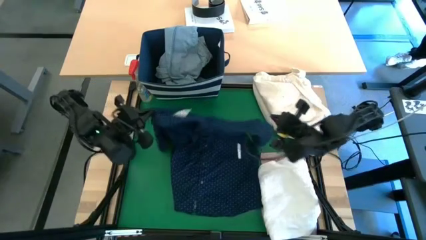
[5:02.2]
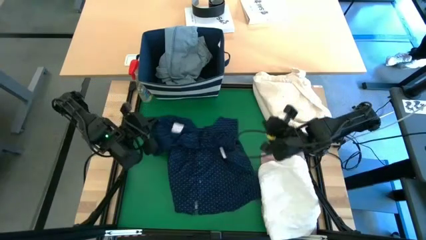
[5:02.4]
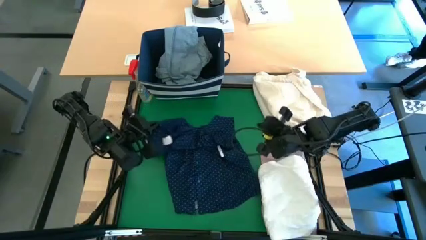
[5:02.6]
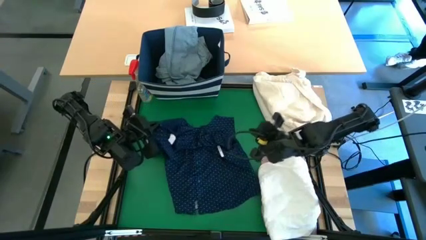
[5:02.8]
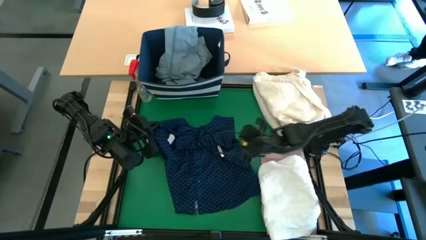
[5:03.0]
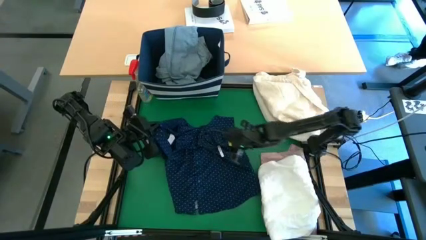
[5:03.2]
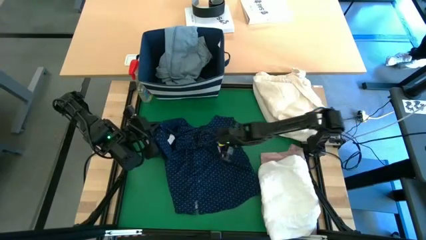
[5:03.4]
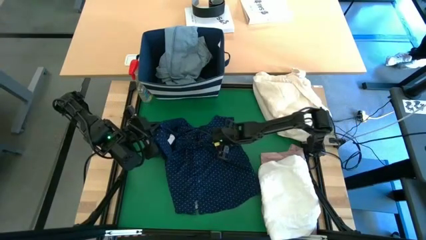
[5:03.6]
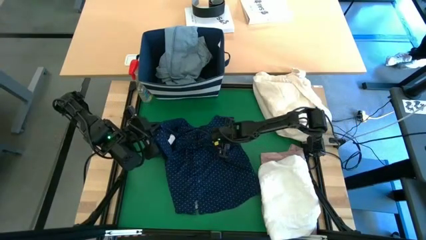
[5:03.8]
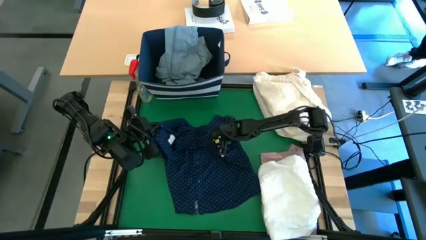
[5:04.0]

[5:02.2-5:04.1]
Task: Fold laundry
Fold the blue polo shirt

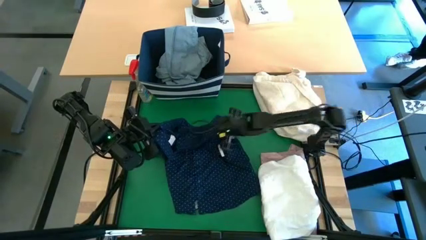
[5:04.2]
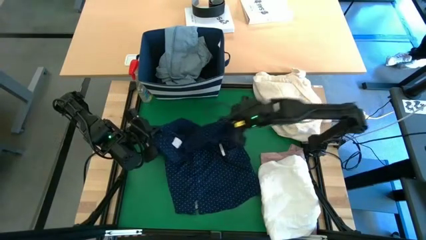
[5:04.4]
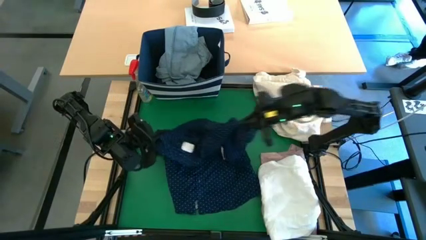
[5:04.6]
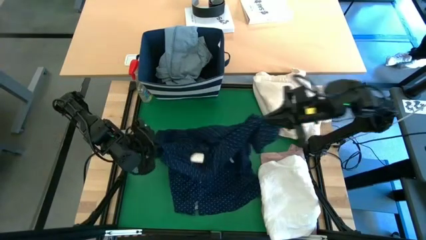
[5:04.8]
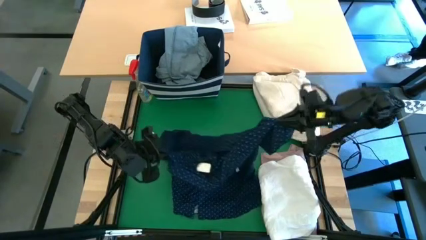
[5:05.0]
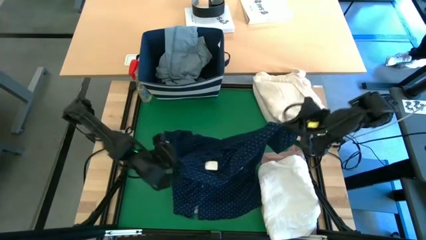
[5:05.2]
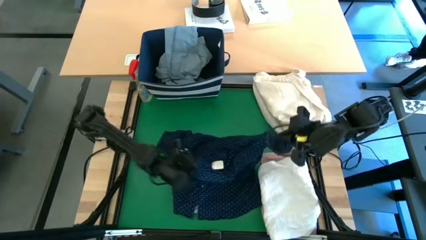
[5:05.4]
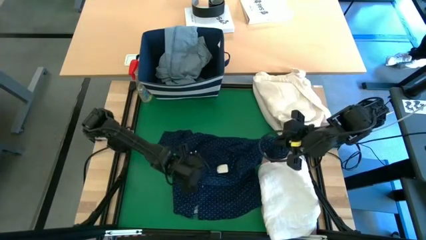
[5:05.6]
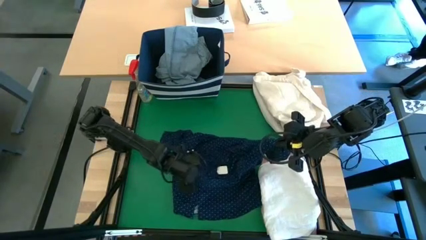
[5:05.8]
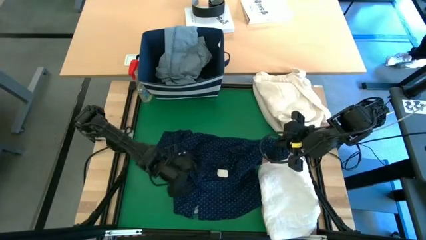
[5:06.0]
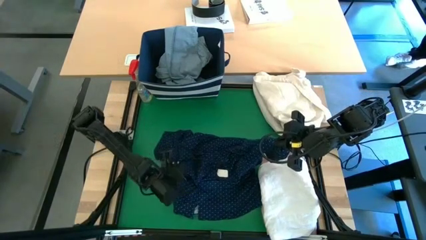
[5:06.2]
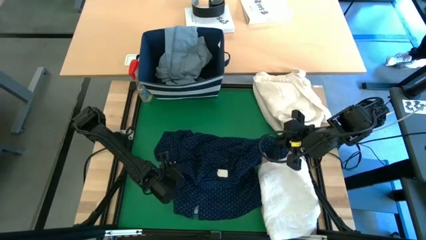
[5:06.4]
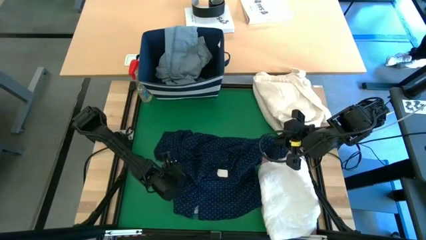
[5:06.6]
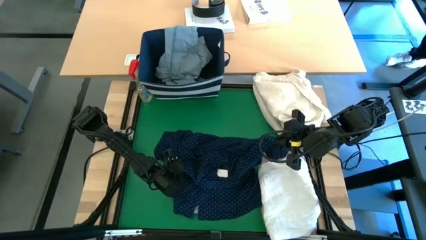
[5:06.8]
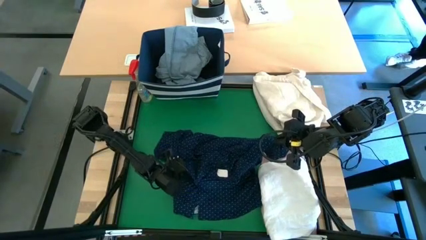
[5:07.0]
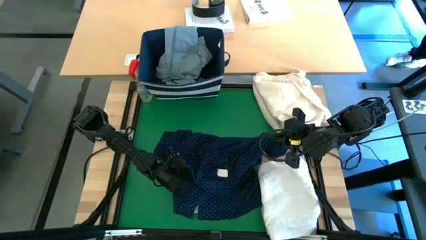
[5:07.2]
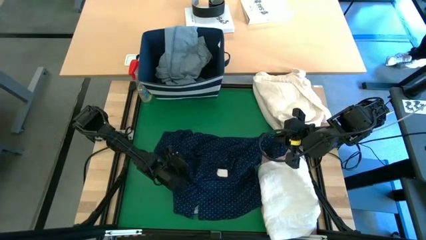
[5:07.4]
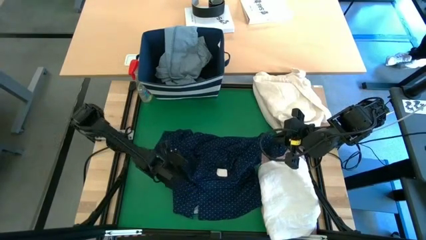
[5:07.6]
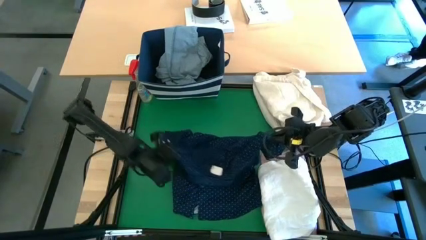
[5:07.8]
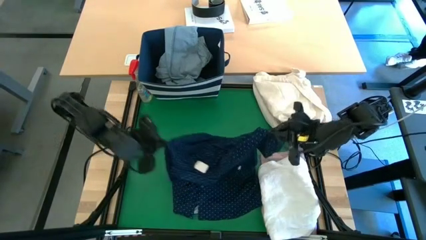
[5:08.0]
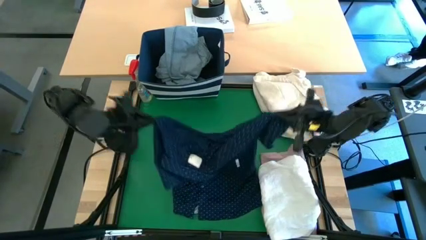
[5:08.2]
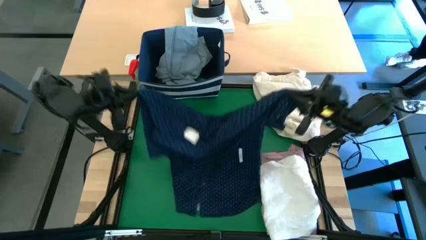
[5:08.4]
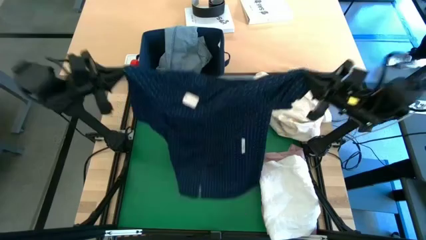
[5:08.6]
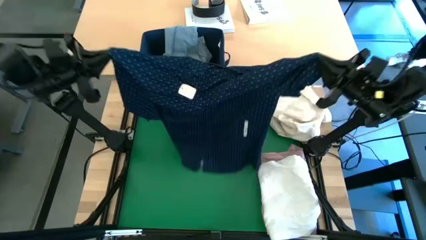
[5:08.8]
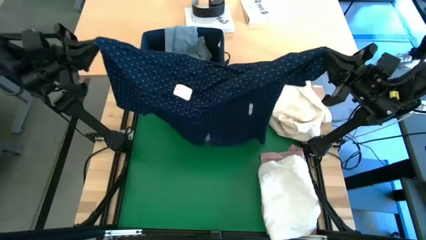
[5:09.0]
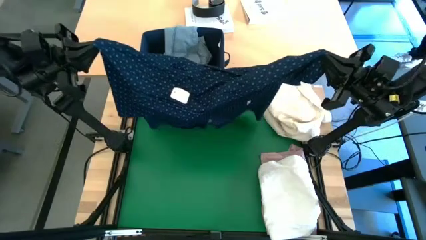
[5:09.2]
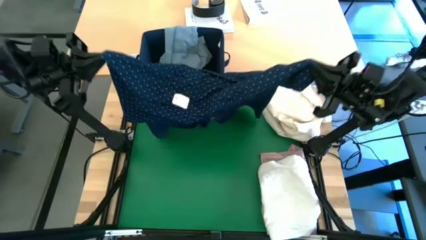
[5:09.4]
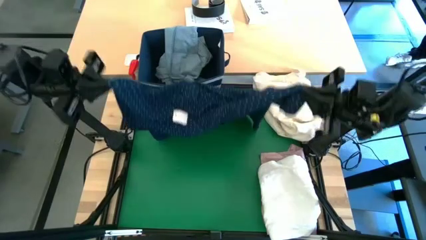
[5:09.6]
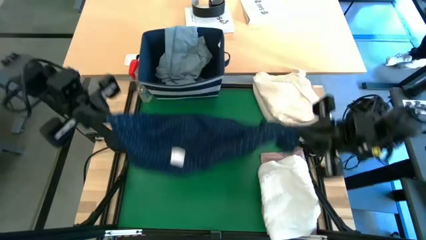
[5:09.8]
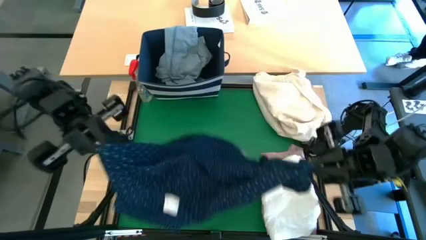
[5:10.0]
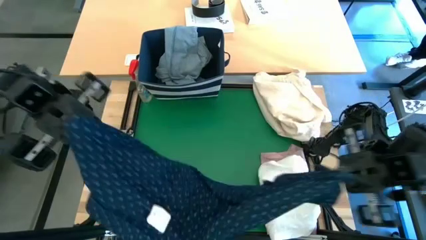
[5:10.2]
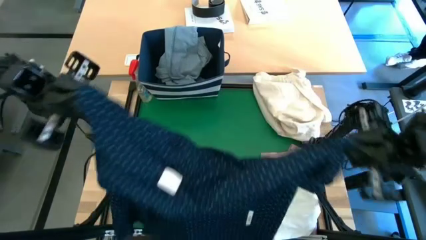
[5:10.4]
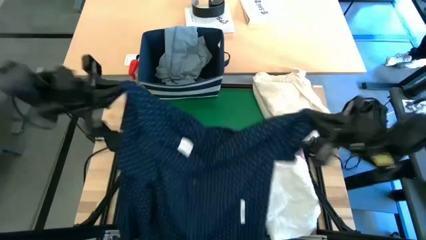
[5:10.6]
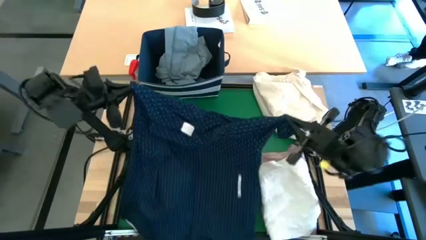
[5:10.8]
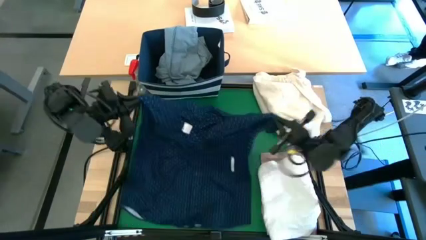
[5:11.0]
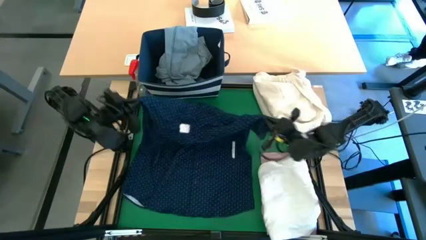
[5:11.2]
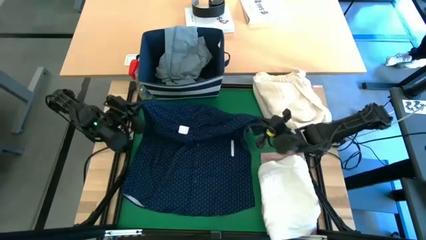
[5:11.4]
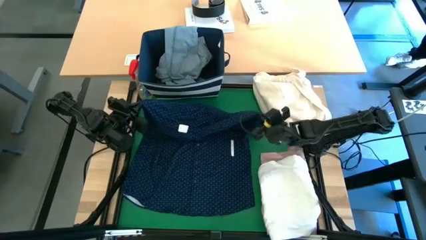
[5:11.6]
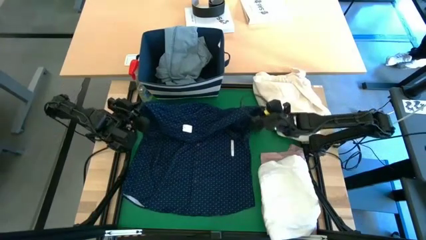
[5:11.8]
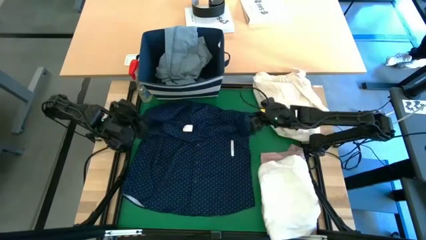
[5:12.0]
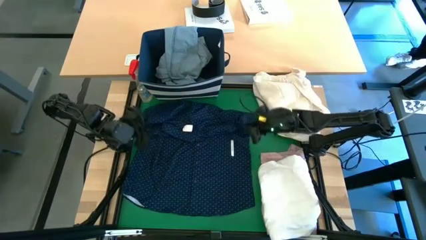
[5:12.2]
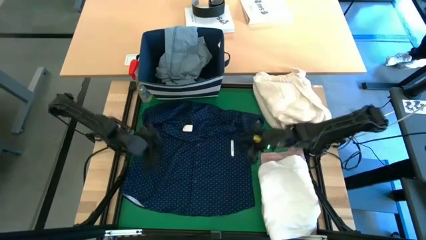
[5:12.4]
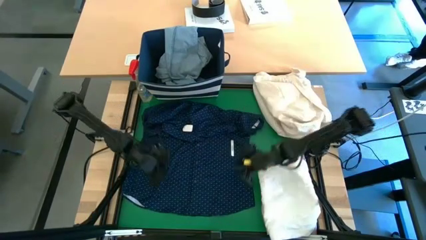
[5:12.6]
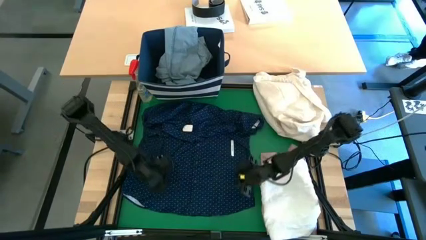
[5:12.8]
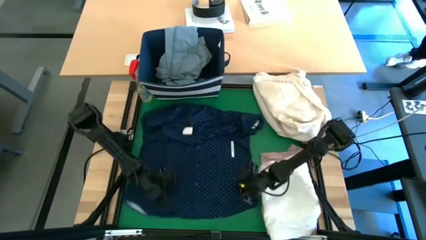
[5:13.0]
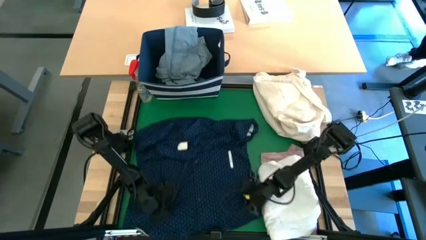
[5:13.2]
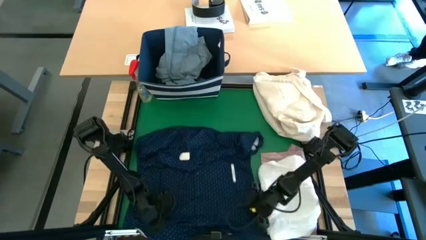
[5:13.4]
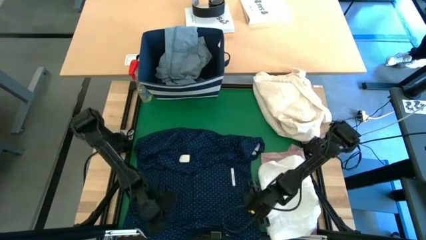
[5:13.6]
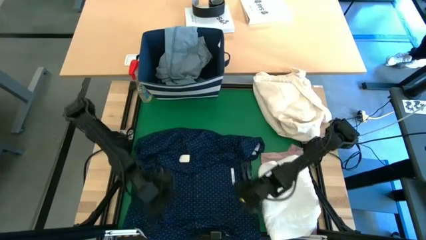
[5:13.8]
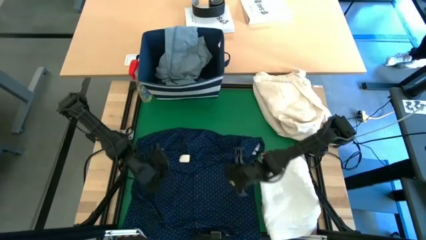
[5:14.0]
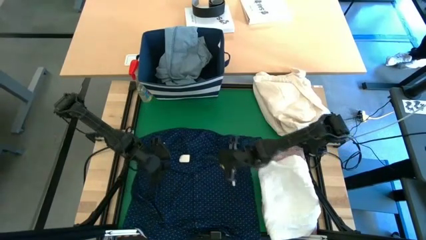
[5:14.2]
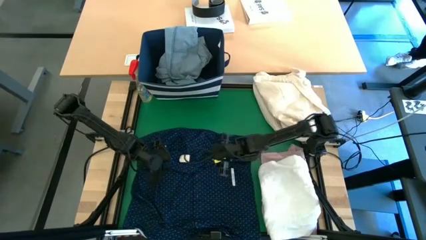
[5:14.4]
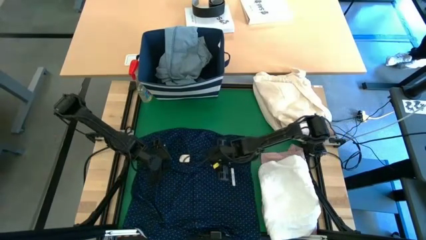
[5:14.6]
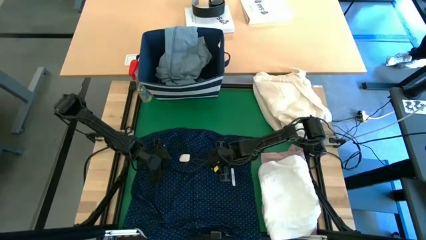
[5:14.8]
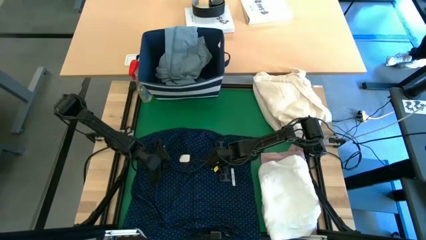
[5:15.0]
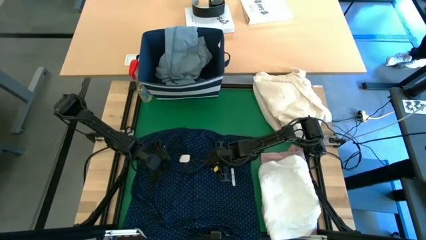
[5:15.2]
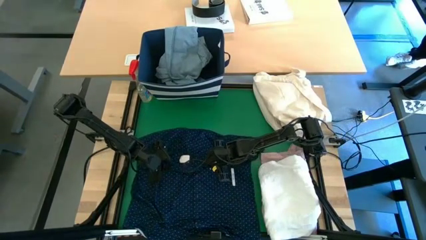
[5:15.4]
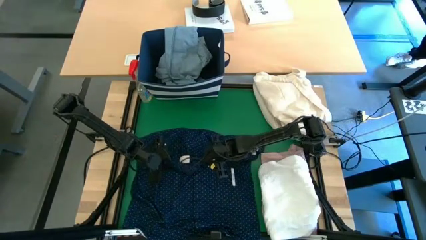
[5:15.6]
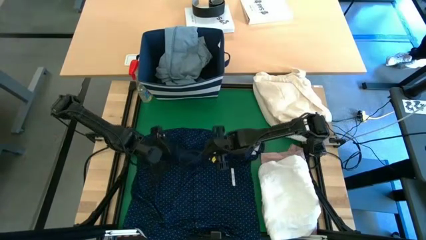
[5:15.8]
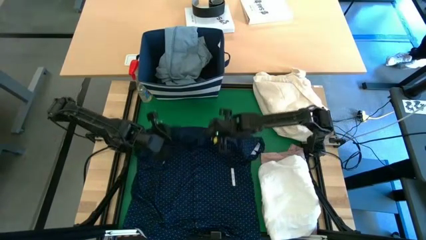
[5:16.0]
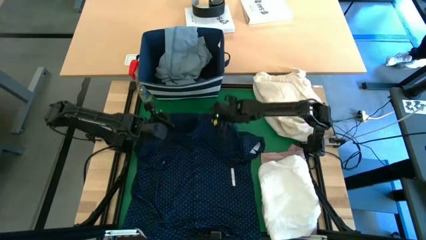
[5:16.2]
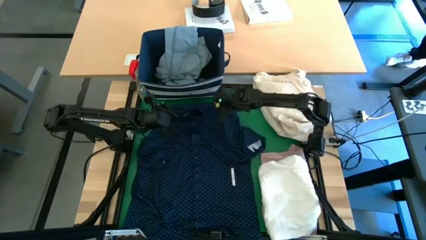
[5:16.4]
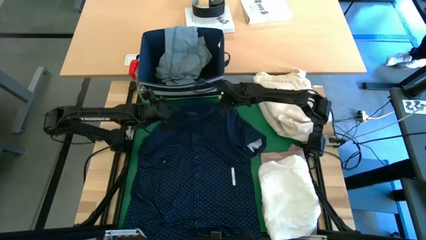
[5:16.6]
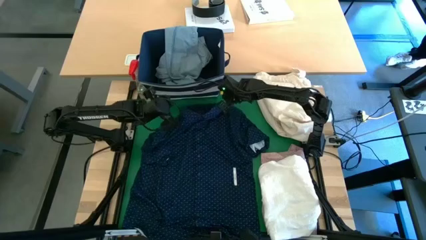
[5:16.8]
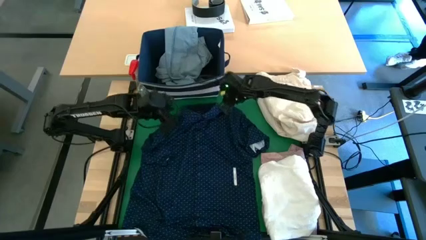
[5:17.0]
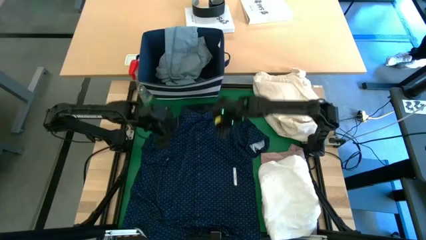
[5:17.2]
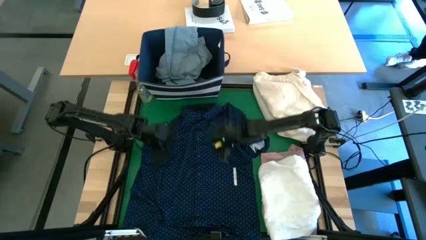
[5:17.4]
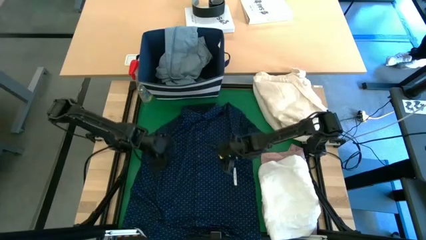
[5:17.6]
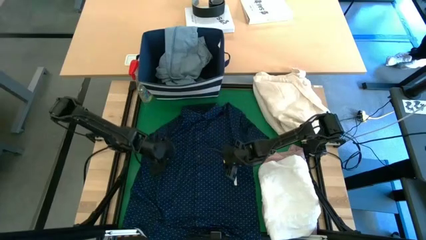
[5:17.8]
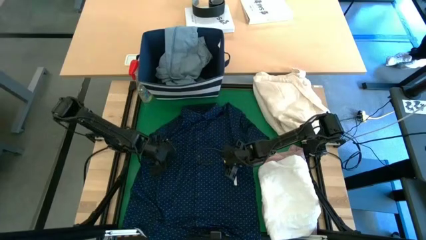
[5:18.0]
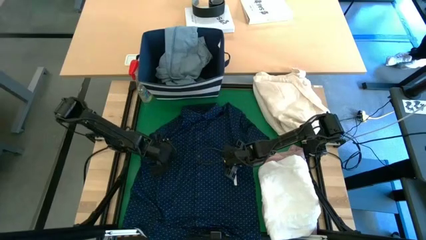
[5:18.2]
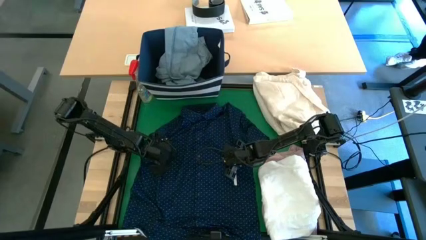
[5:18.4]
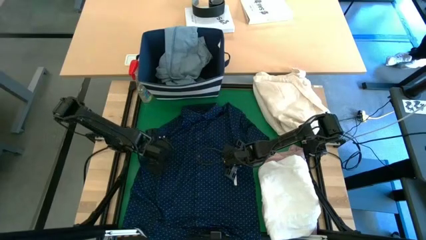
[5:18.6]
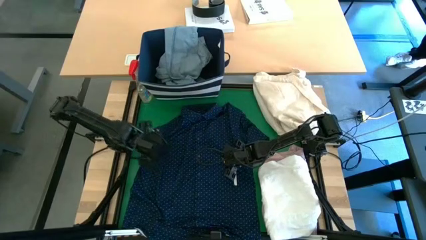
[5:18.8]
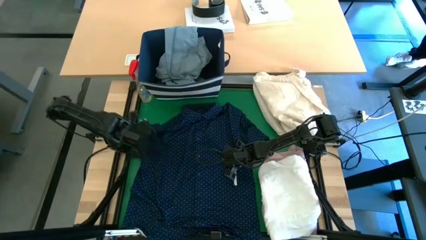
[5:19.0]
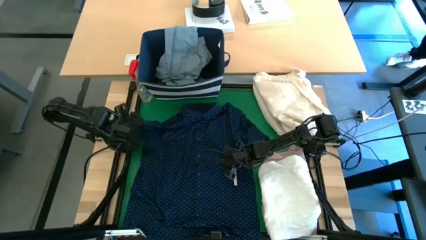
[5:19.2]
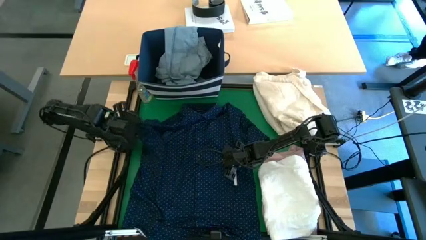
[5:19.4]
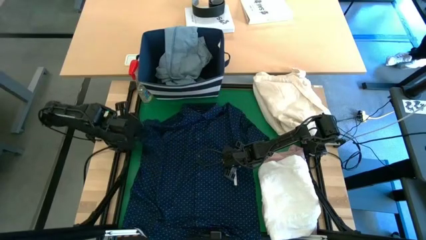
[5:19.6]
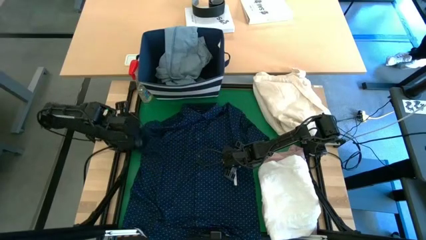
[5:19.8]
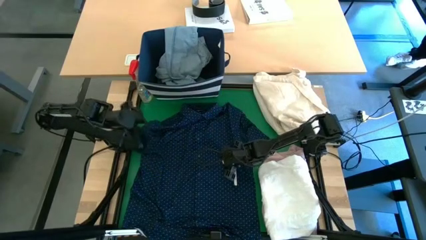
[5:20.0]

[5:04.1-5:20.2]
Fold the blue polo shirt
